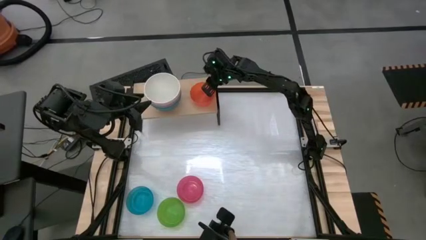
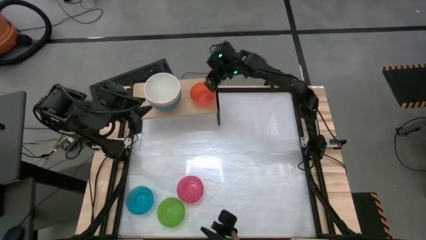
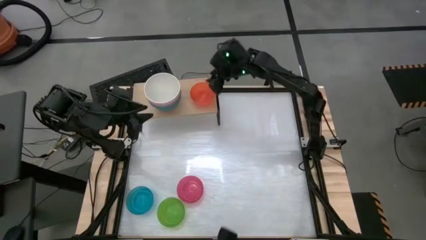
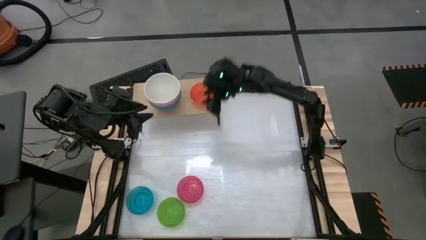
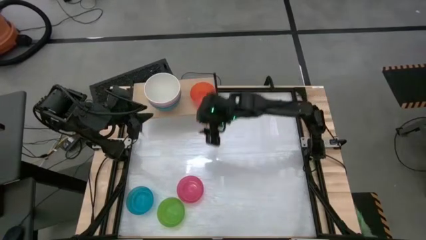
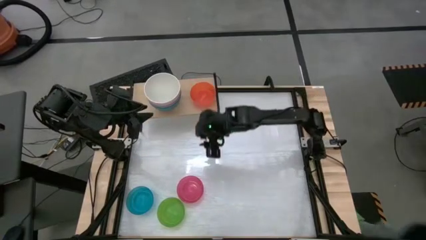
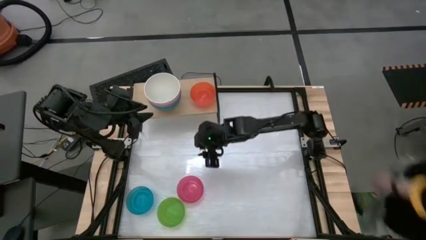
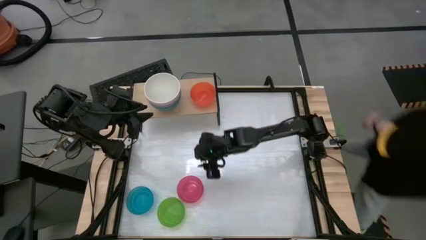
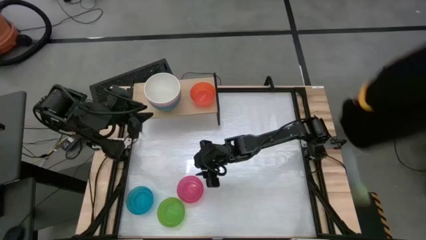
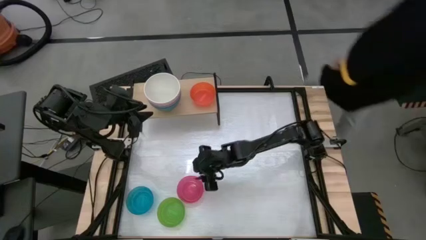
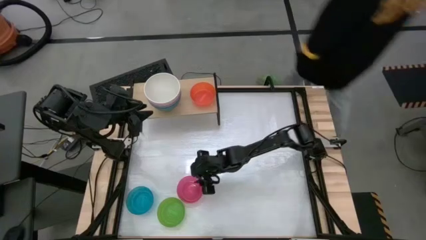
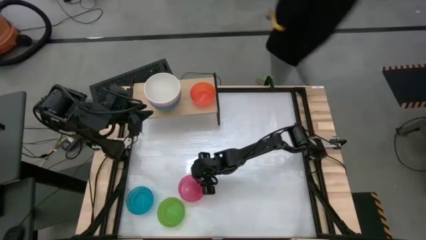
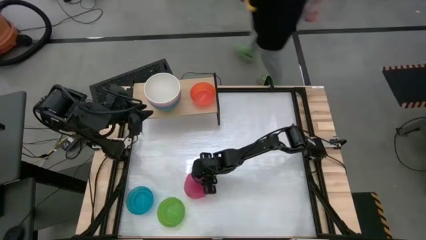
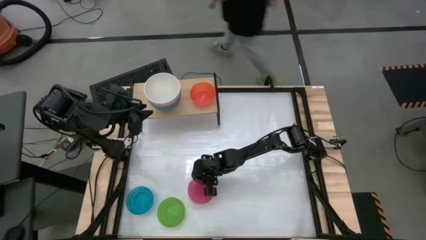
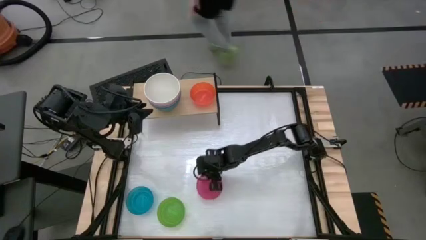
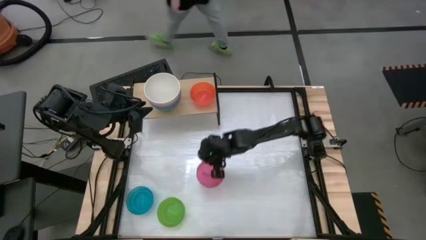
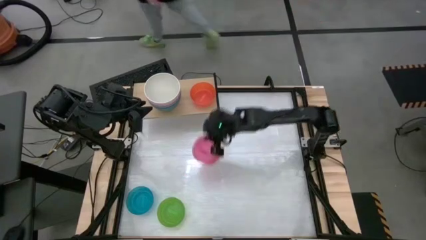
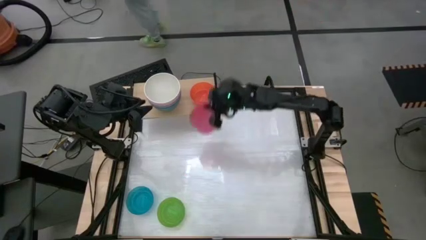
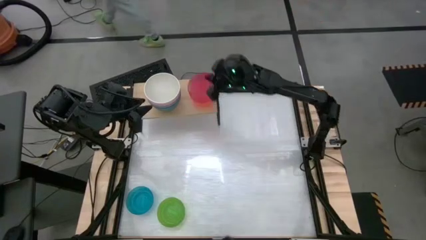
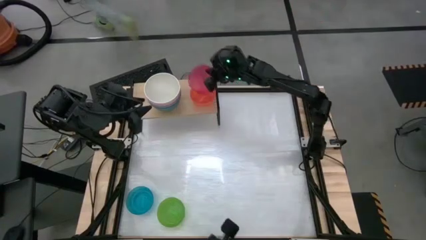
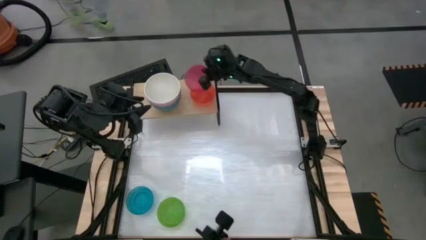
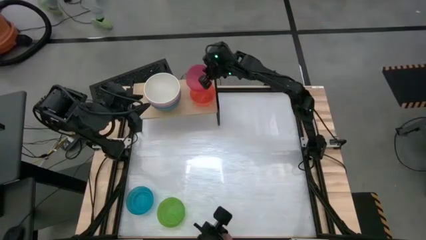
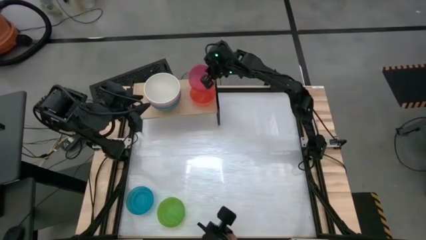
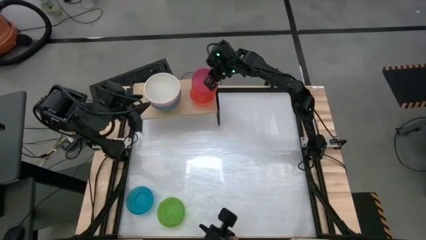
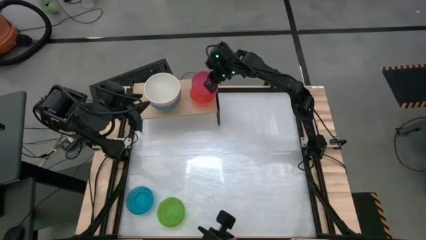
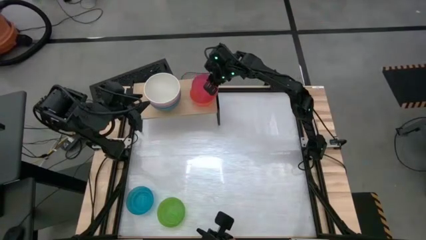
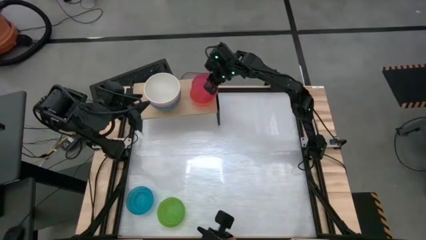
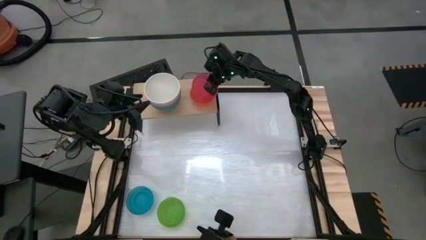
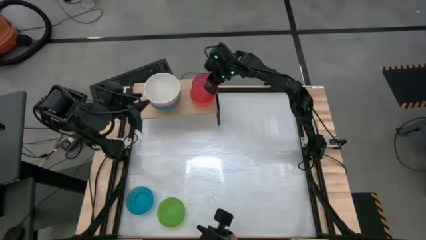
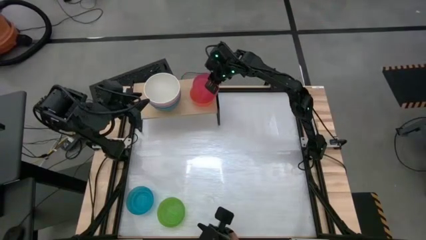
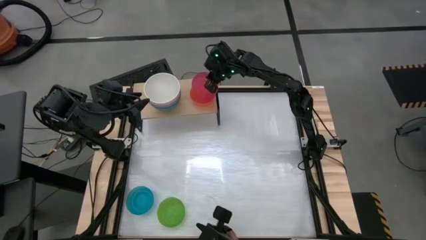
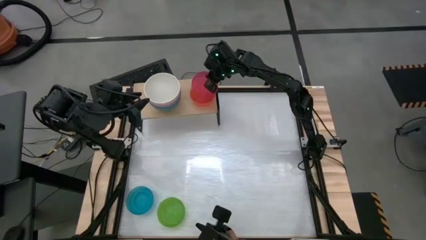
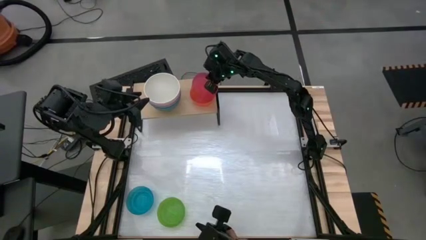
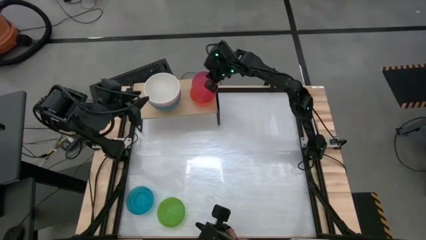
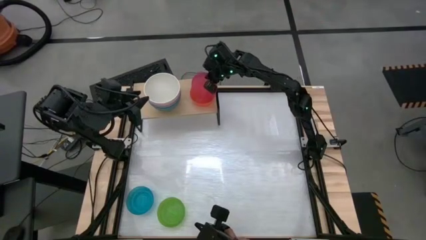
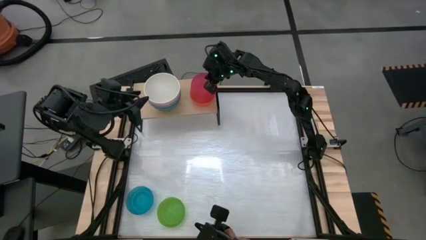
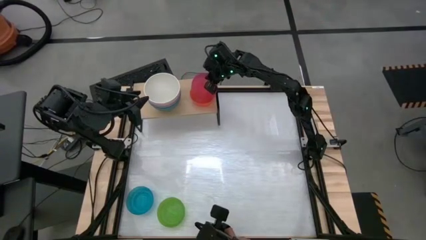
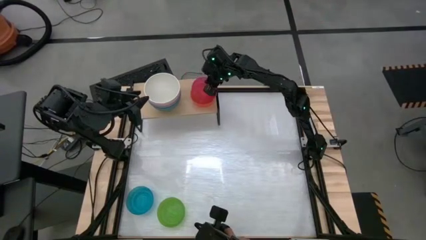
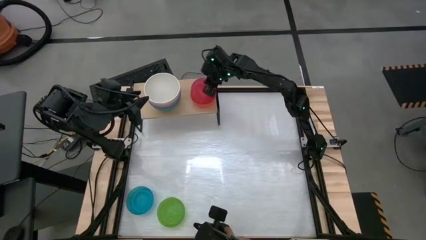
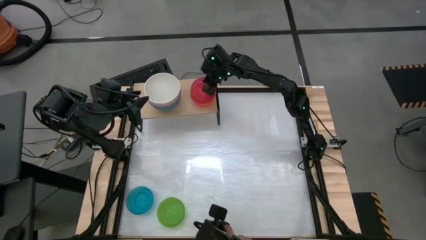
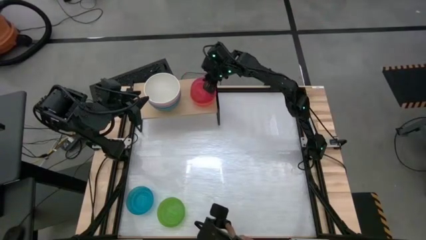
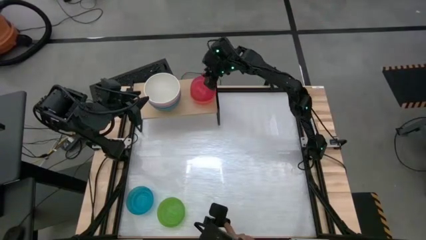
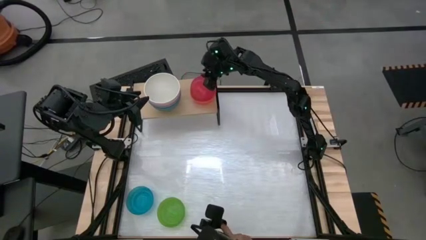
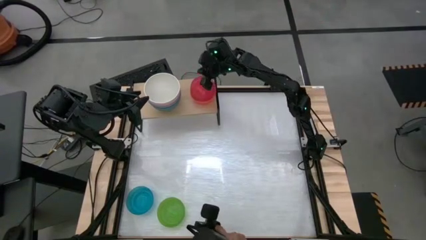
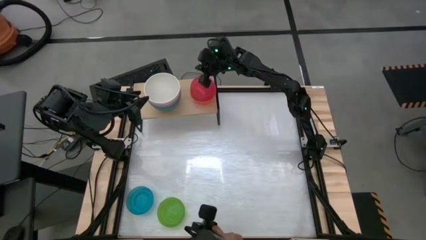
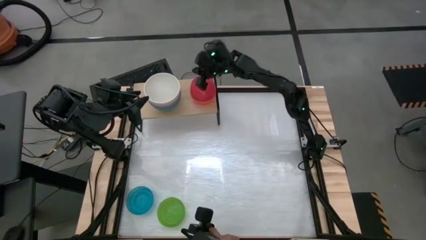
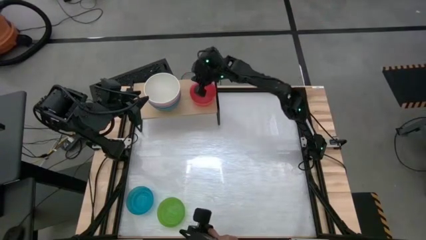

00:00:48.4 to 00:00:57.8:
Task: Place and stack bowls onto a shelf
Stack the small pink bowl on top of the small orange bowl on the shelf

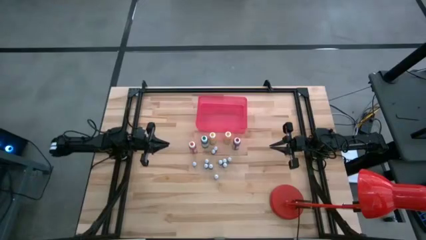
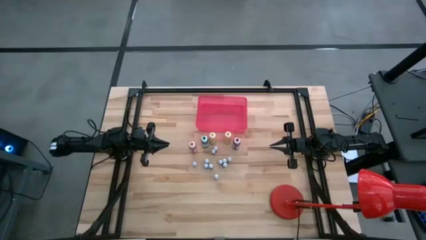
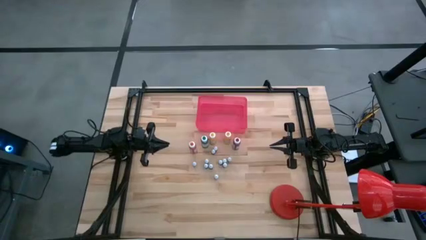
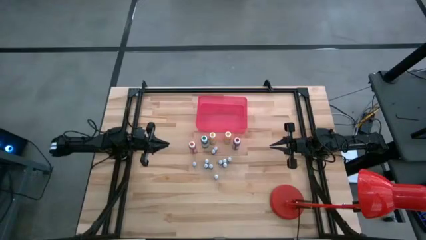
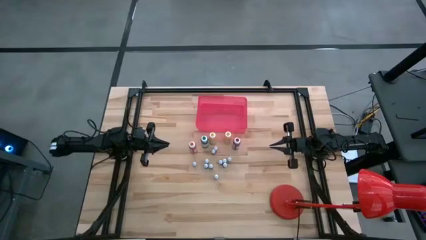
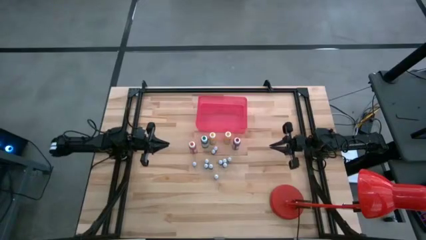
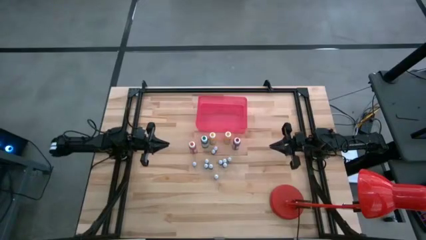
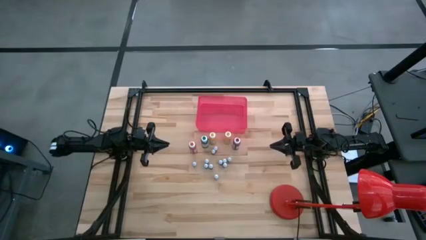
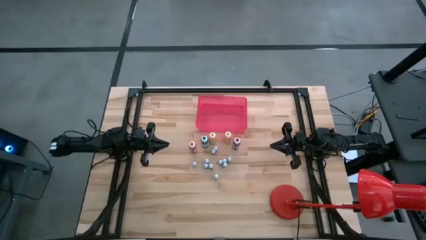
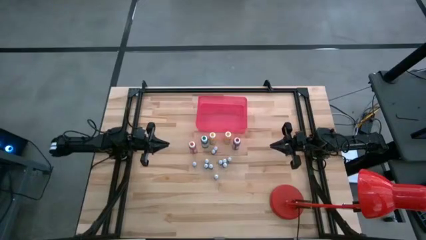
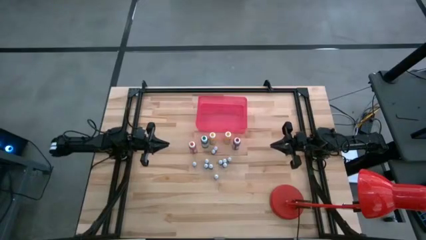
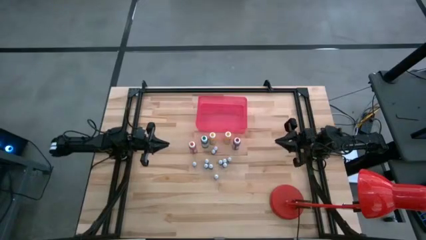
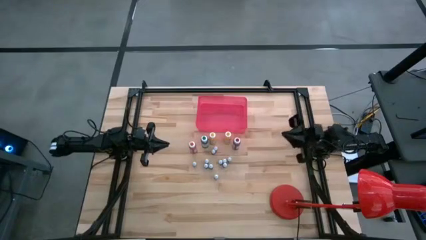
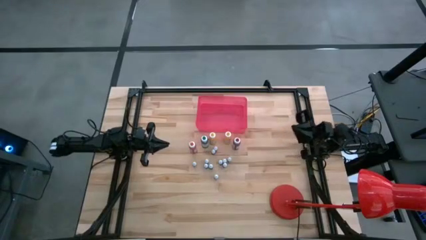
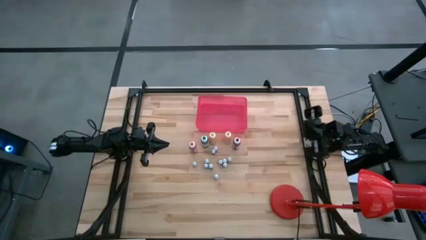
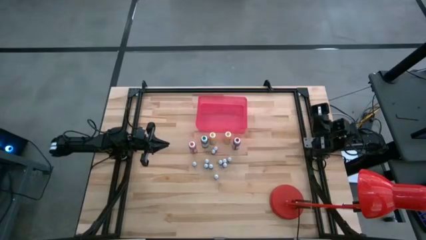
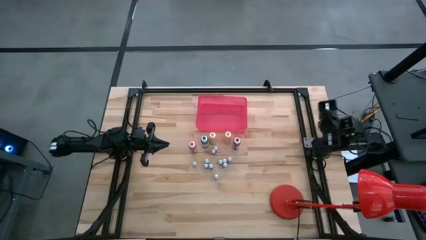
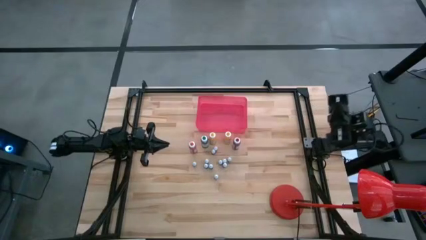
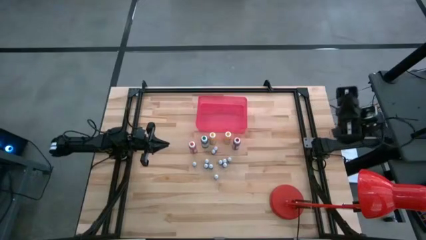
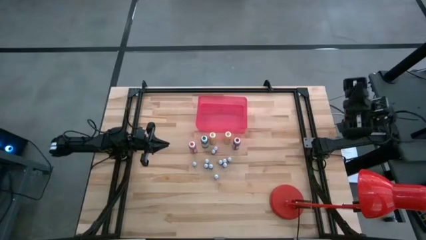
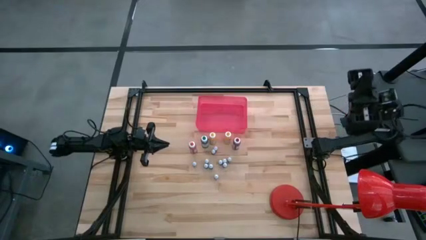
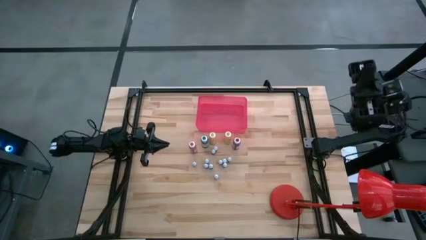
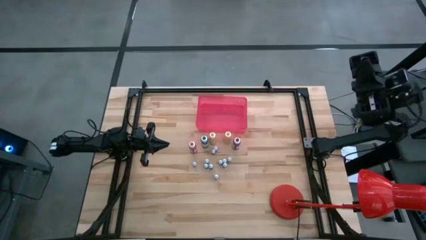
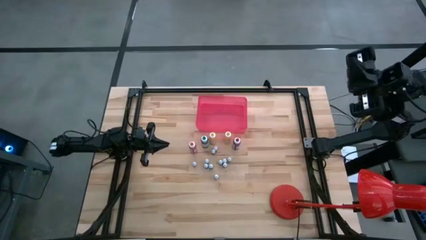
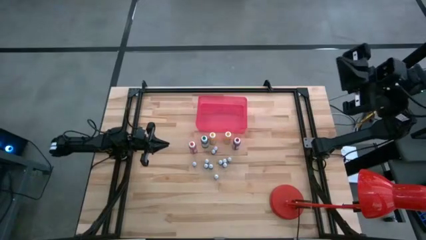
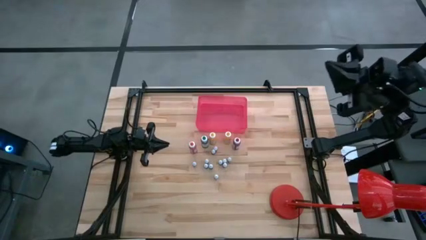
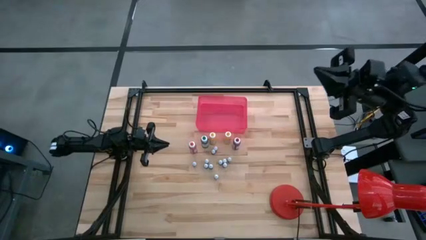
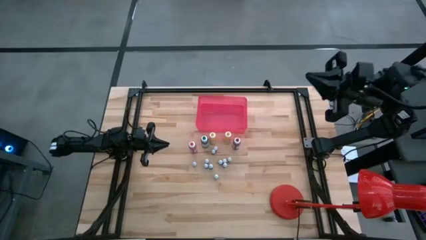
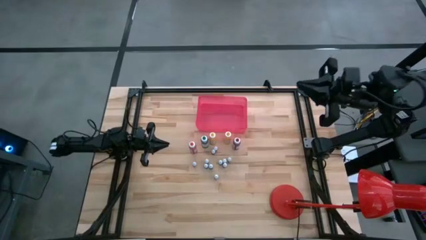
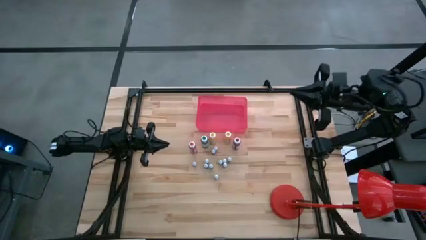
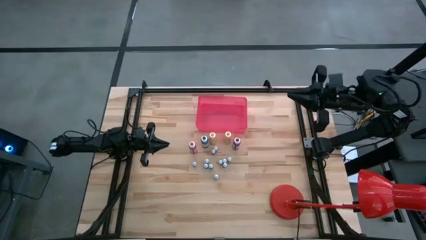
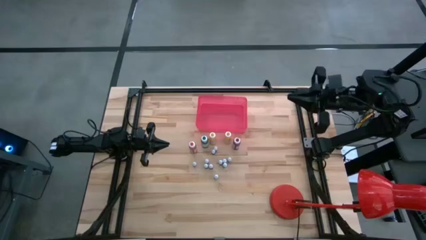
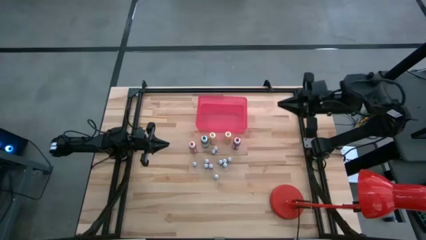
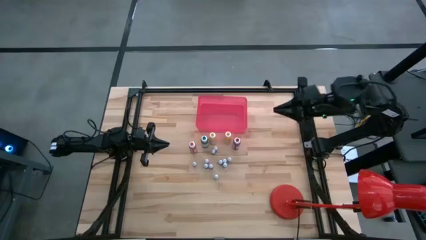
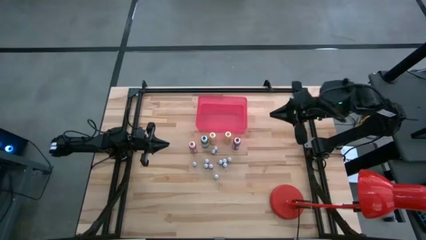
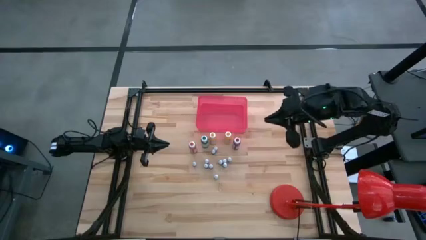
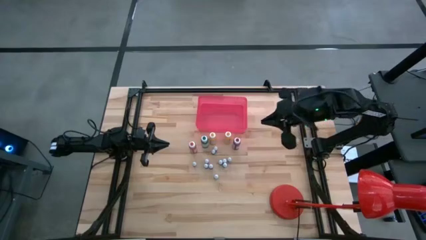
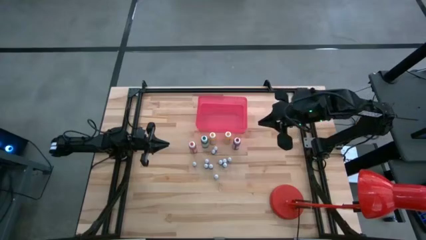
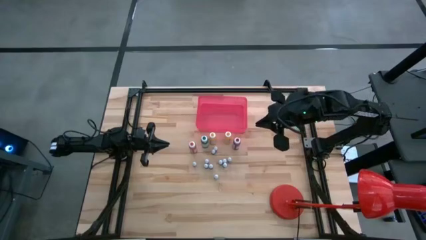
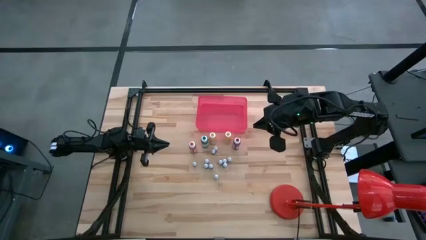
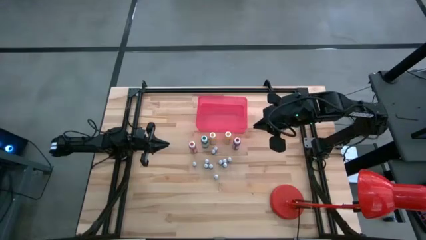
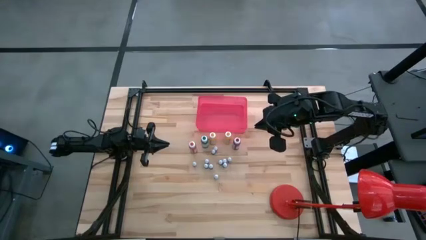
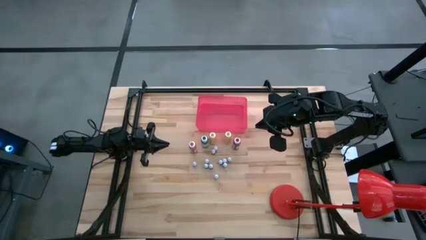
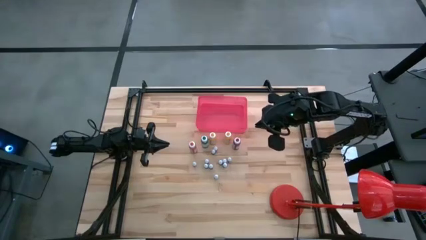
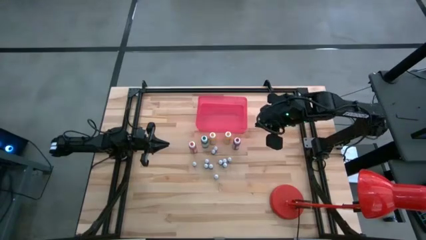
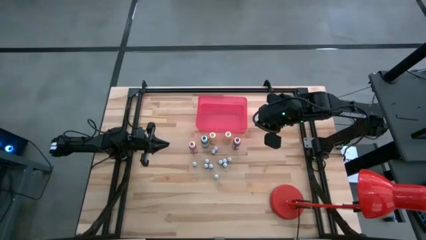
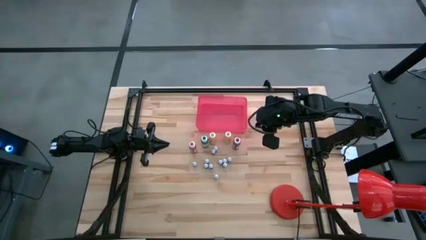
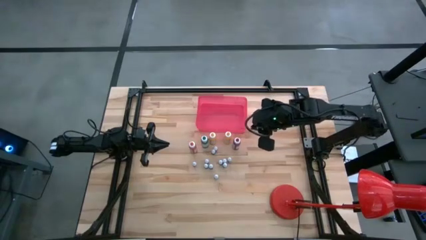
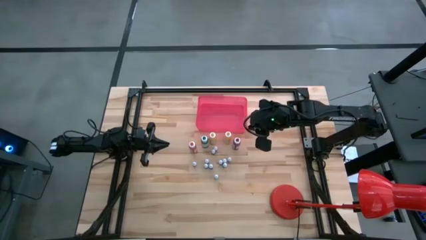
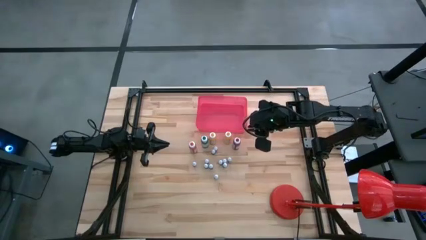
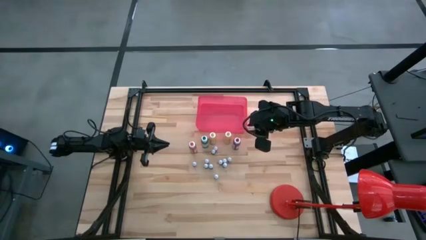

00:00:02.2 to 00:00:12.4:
Task: Pick & Place food coloring
Put the large red food coloring bottle into the pink bin
